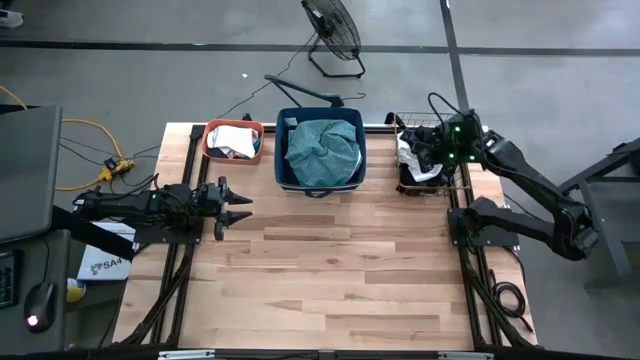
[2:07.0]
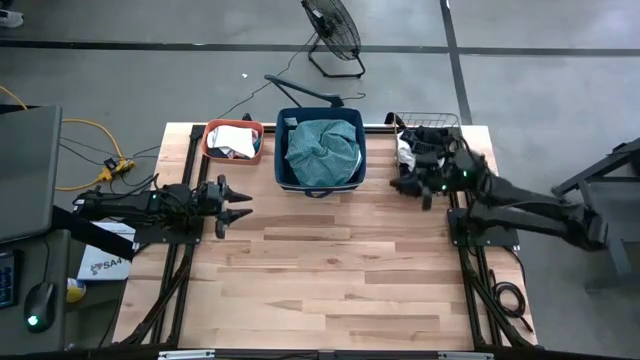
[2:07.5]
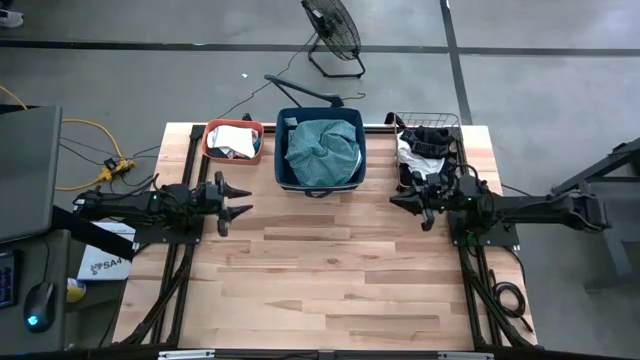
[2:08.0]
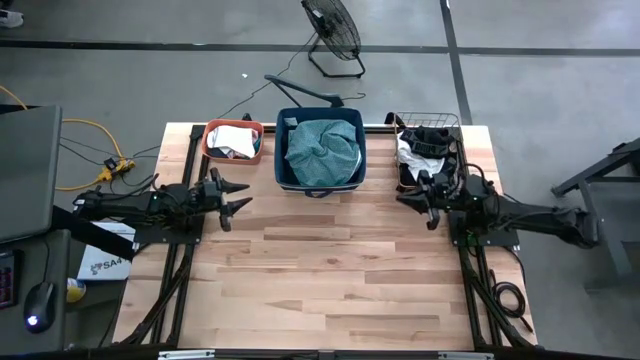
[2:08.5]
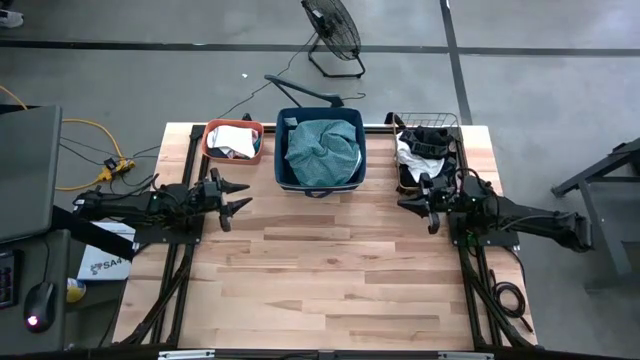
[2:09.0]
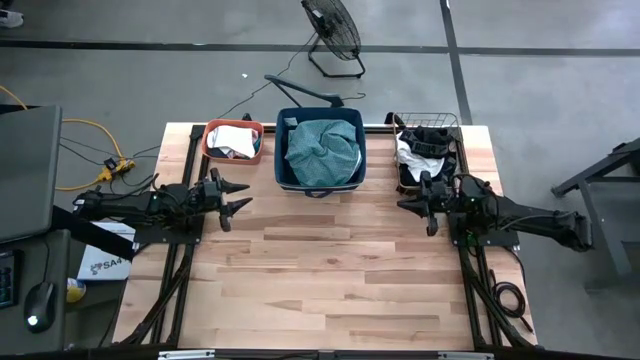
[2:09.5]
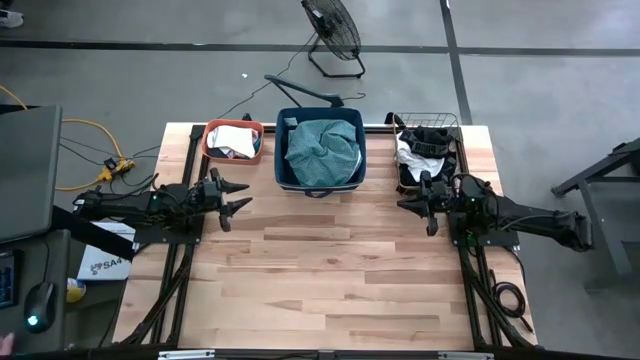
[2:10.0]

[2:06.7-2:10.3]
Task: Pick & Place Cloths
Return to Home Position

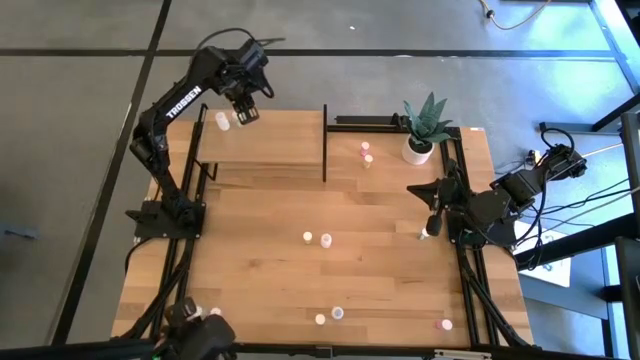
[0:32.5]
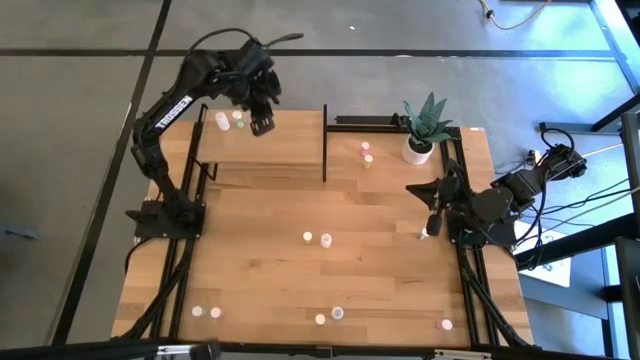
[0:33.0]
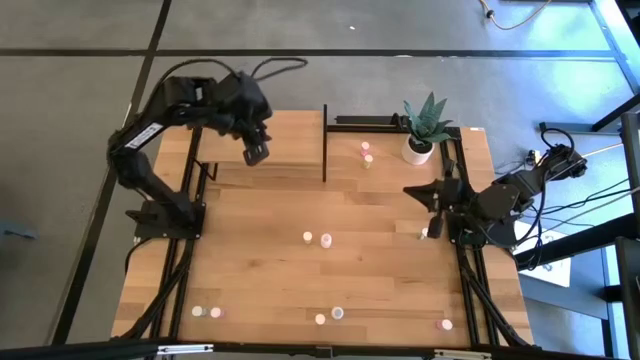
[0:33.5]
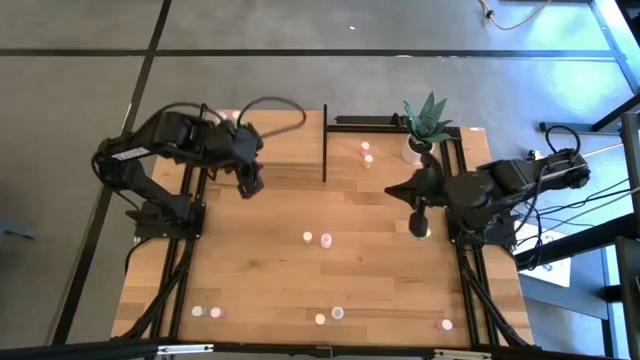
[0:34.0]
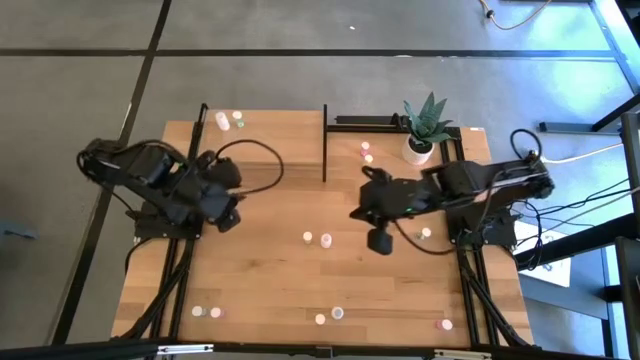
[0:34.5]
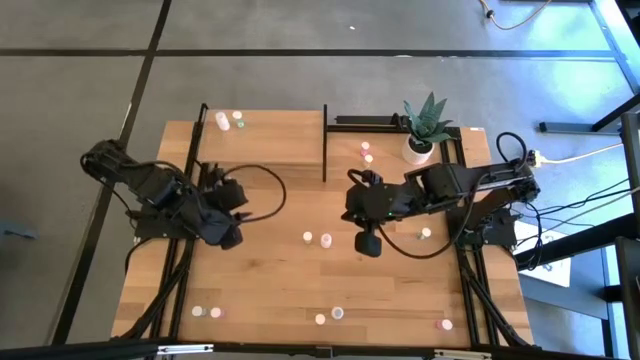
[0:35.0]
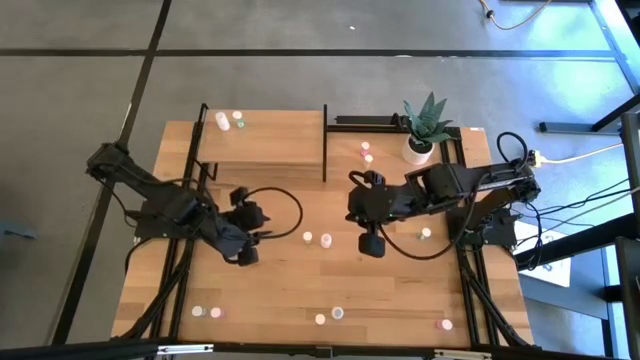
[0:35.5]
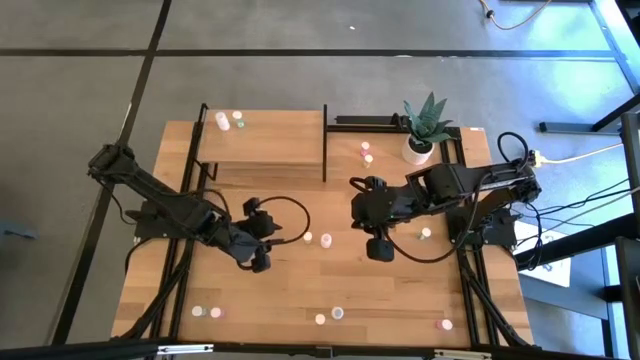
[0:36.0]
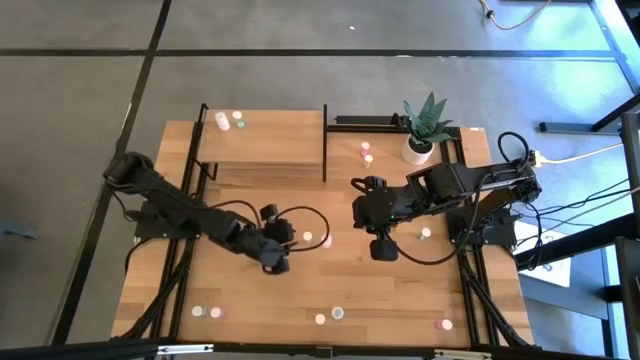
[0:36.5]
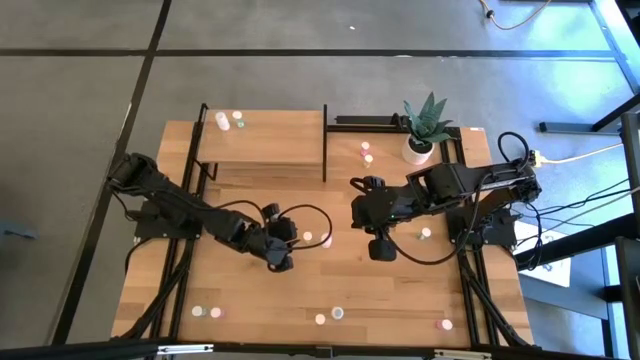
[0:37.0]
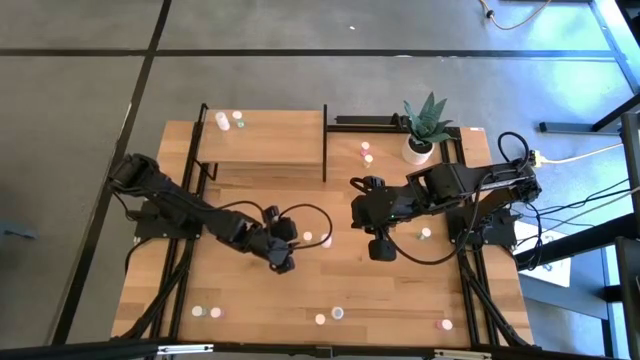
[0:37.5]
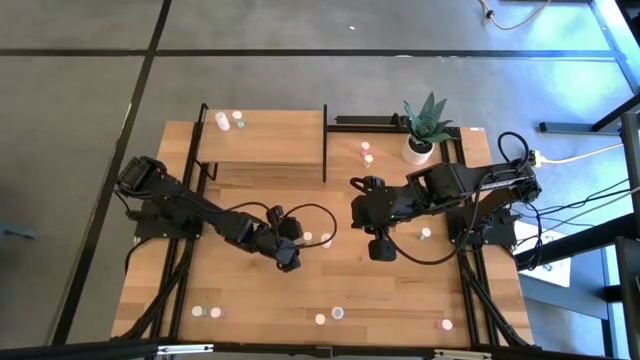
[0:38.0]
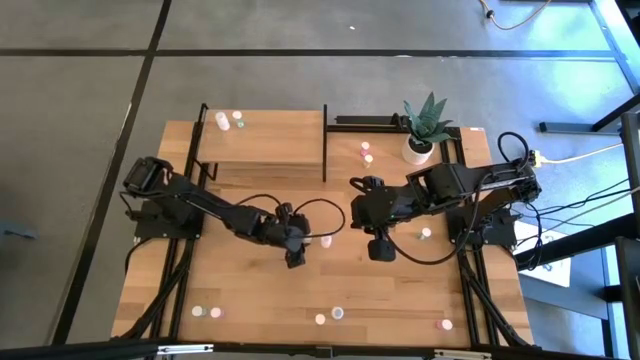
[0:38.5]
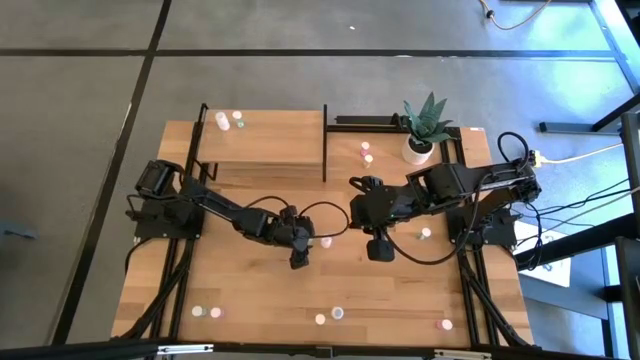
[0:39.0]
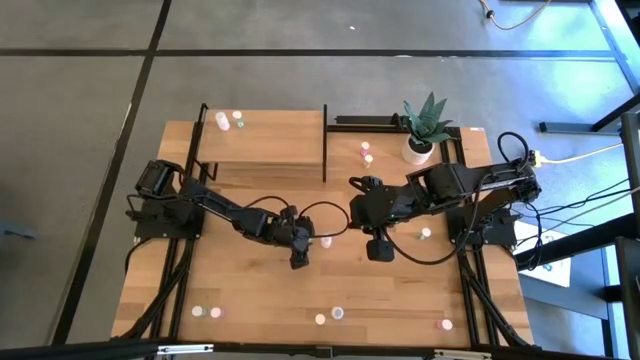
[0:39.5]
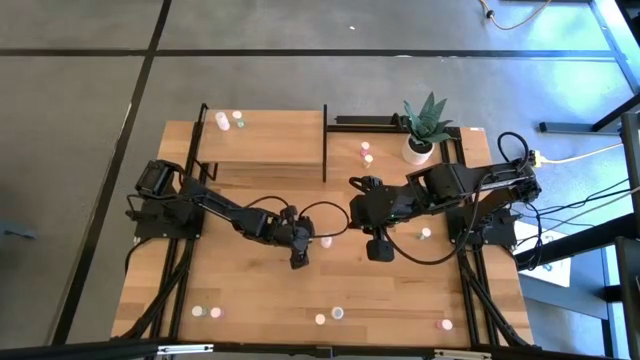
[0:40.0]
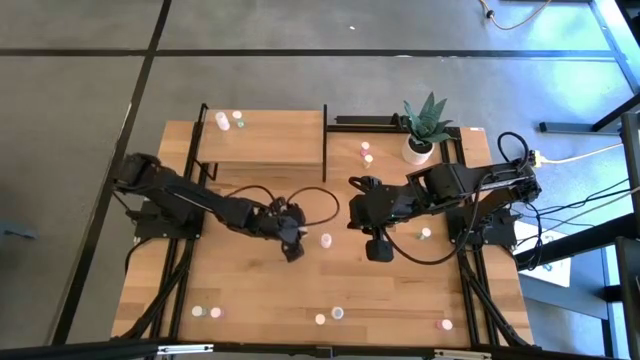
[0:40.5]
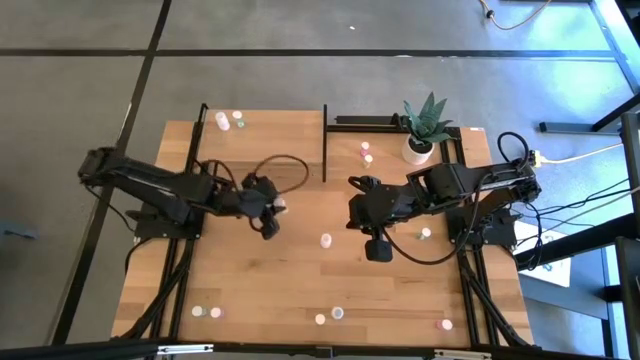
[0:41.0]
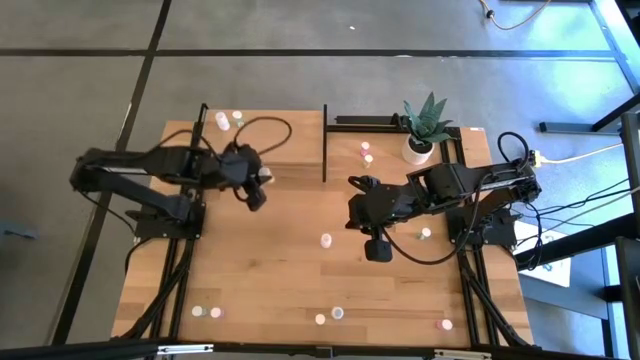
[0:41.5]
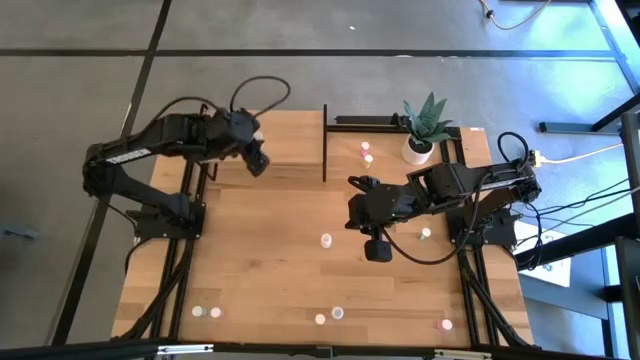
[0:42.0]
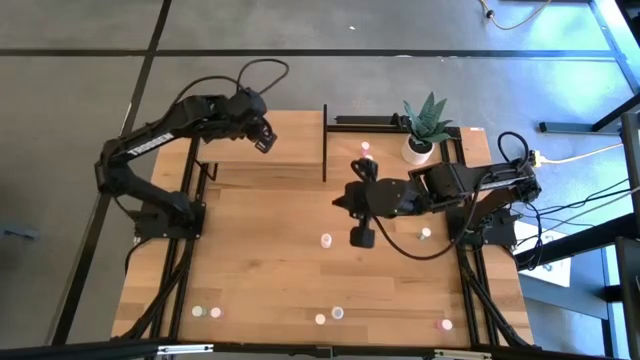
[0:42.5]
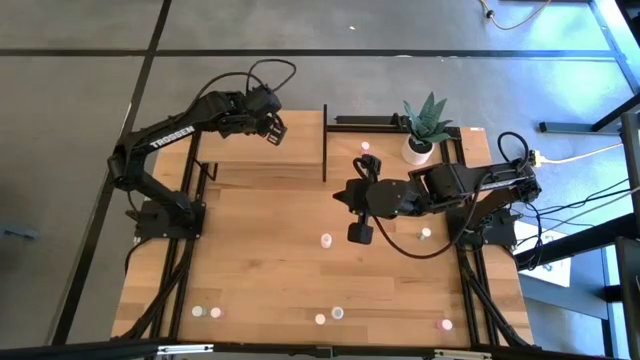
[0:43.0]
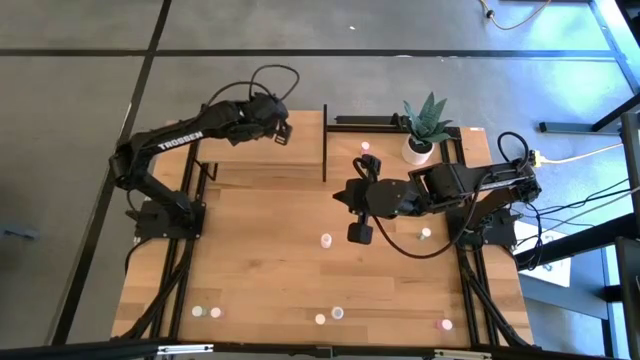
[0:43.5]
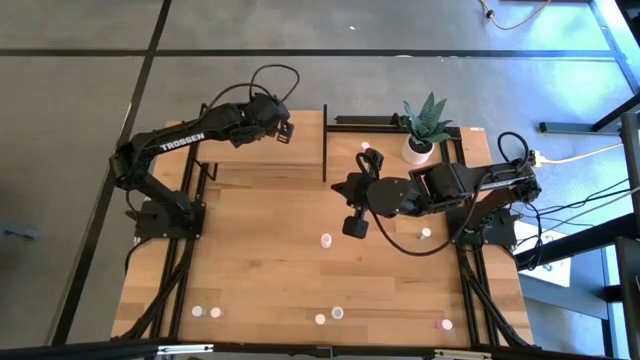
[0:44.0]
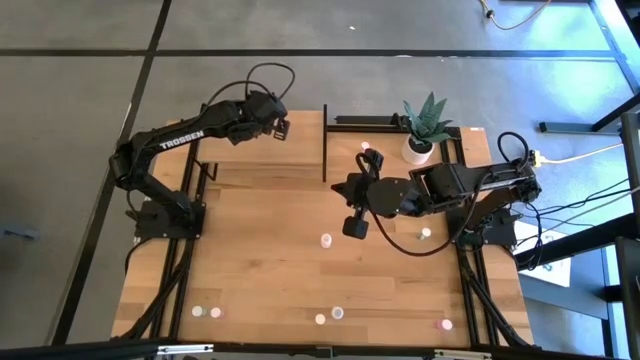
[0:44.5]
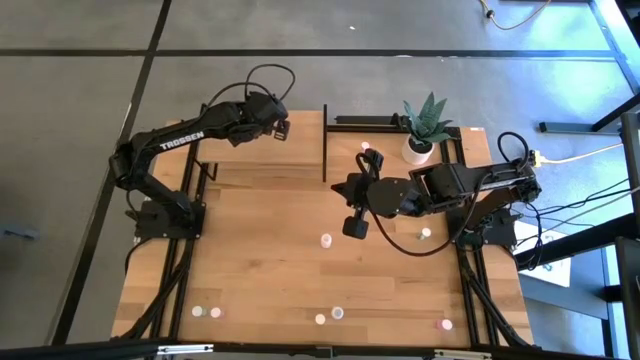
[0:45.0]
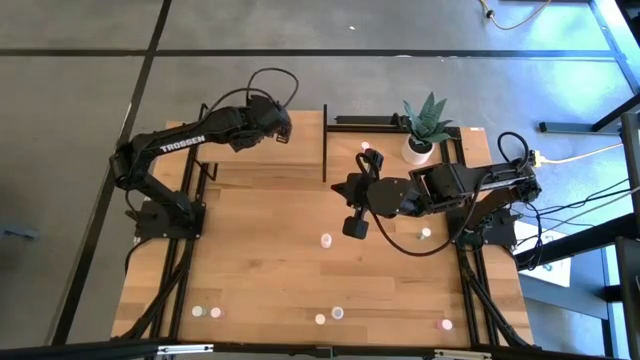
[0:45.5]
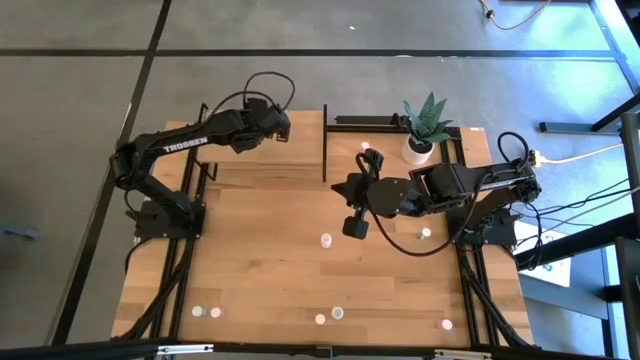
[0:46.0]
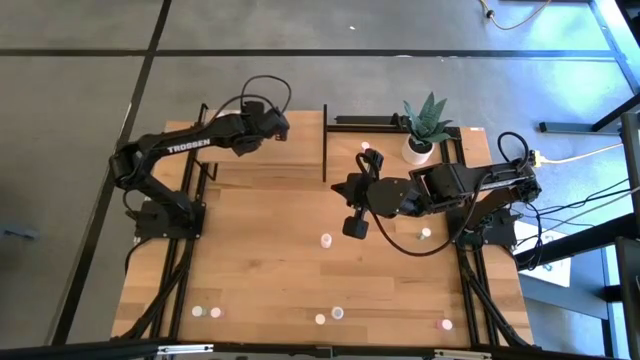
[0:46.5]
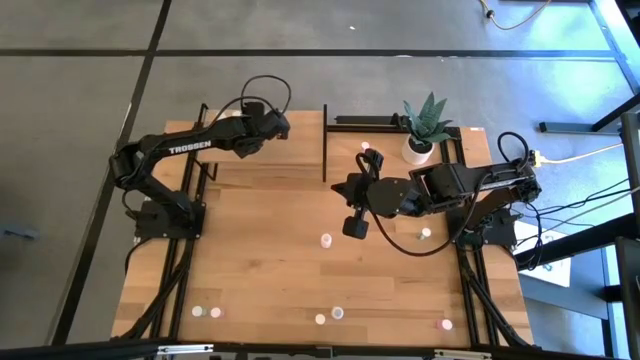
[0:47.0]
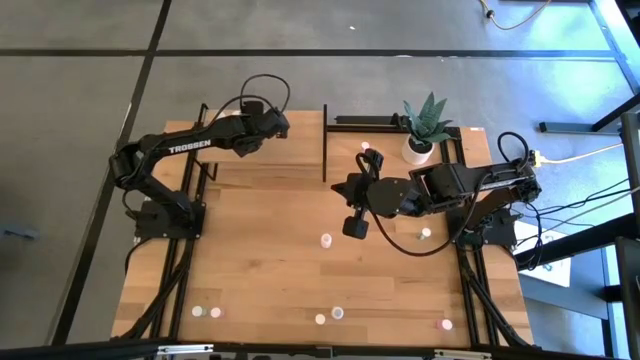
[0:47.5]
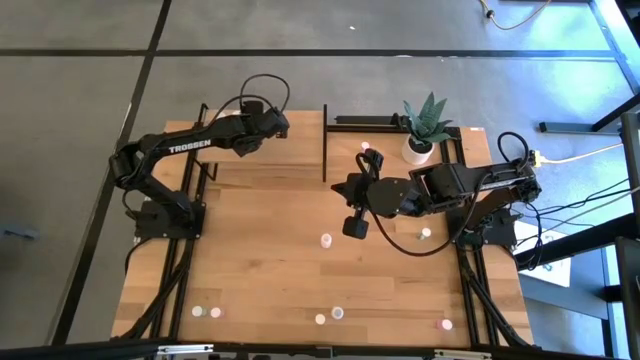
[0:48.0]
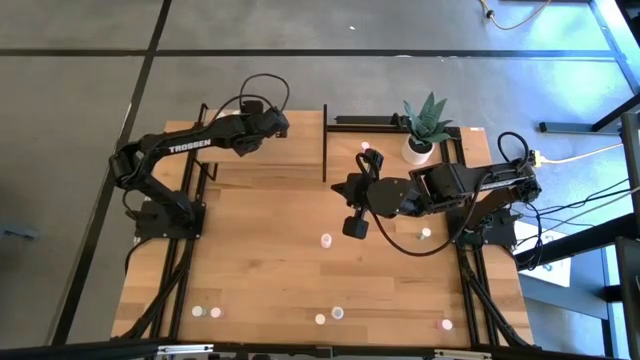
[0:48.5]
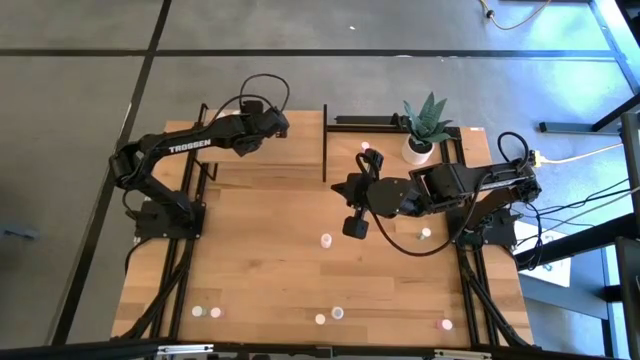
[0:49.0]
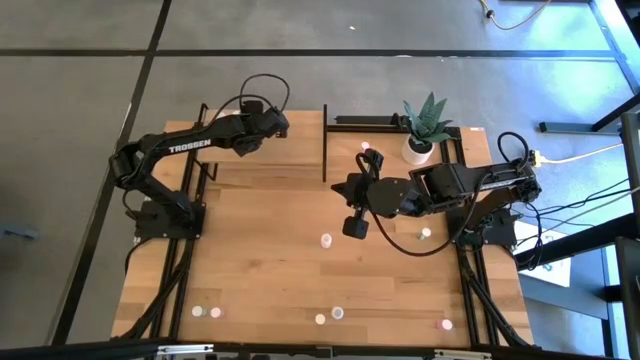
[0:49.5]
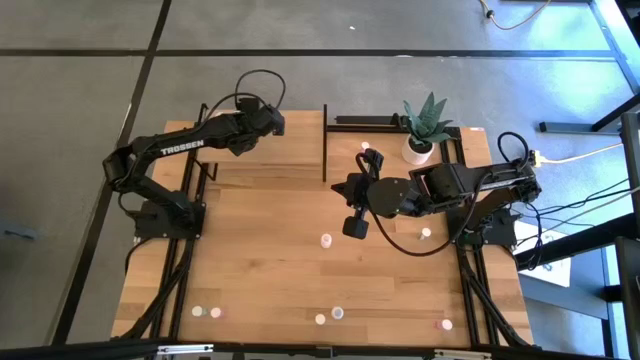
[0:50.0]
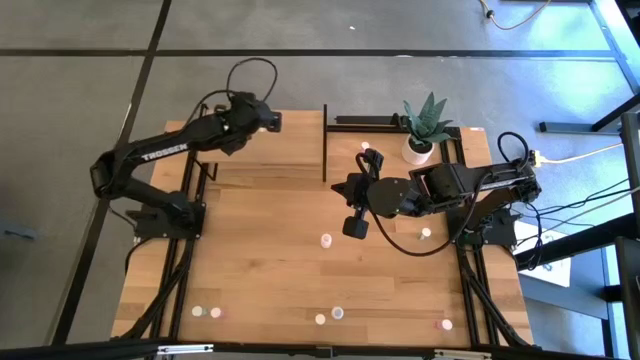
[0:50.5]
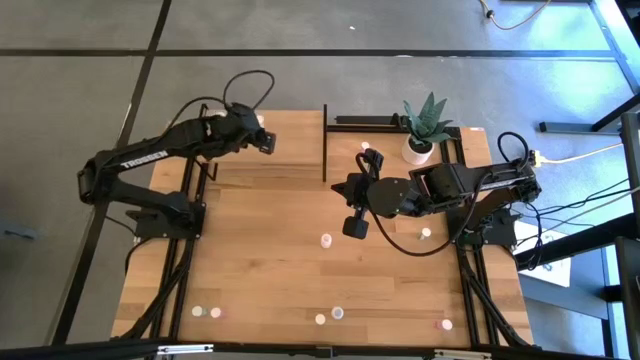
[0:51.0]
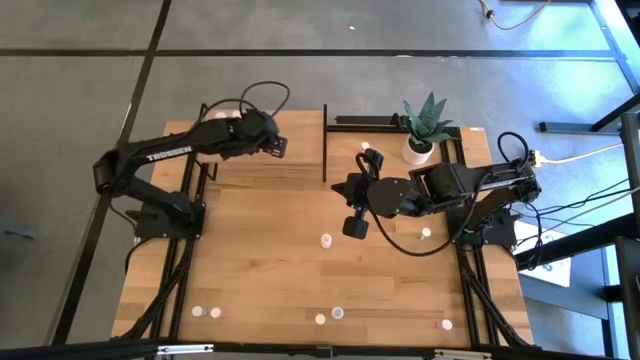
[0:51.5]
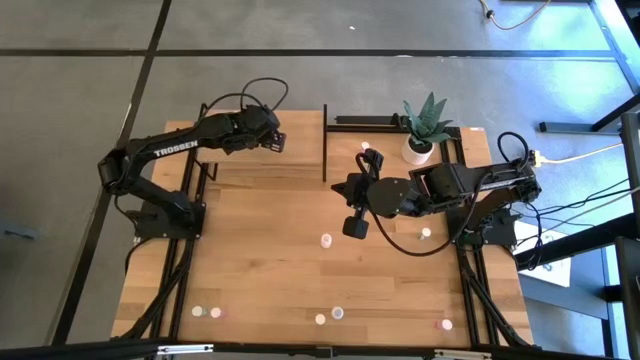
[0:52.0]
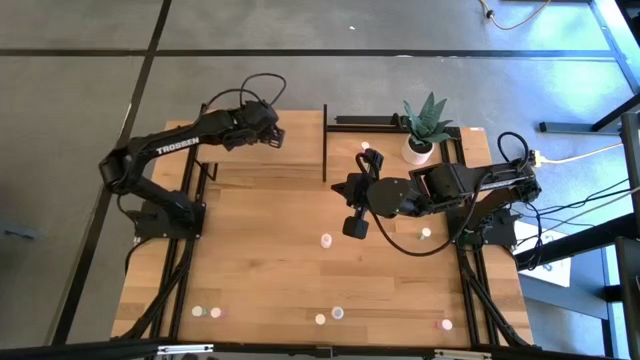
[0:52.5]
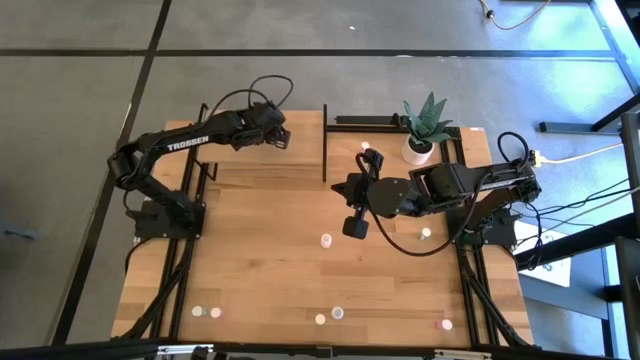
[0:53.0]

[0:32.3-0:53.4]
Task: Pick and place medicine bottles onto shelf by color
Put the middle yellow pill bottle on the shelf
